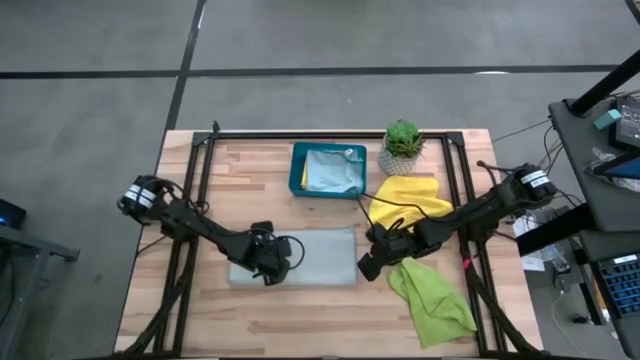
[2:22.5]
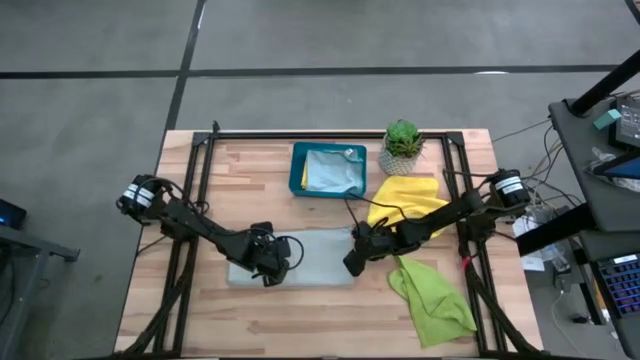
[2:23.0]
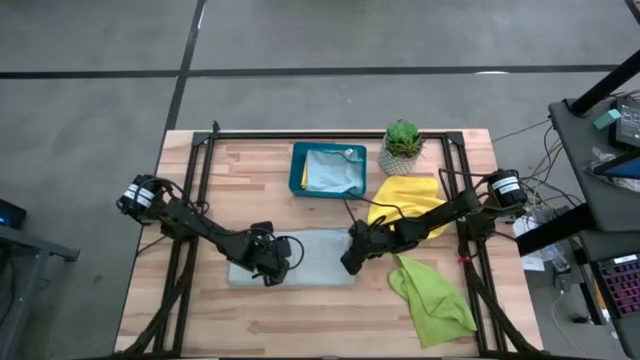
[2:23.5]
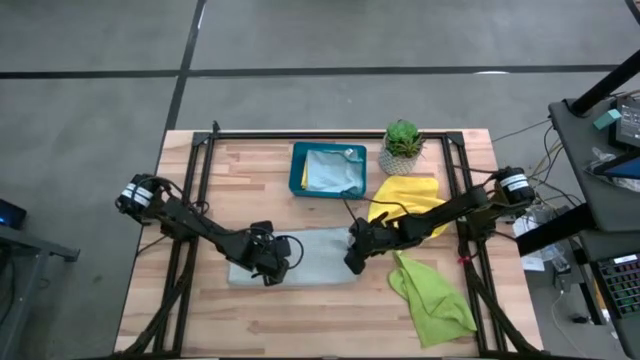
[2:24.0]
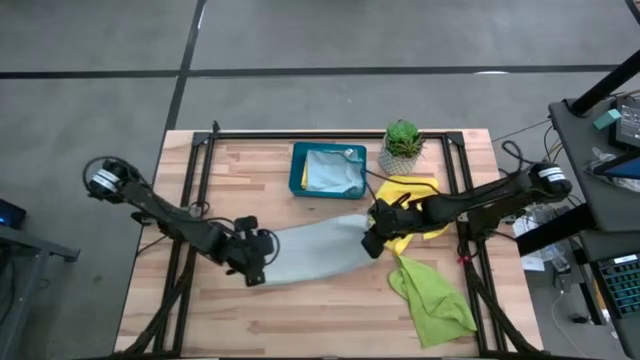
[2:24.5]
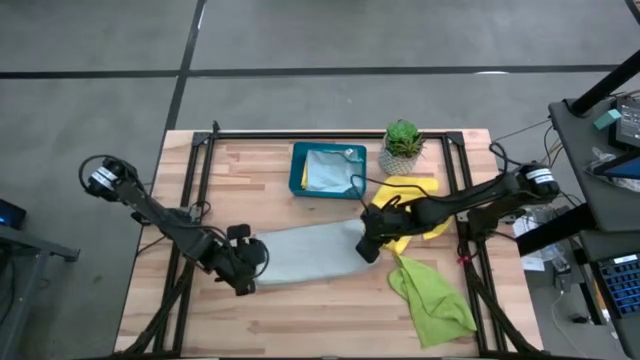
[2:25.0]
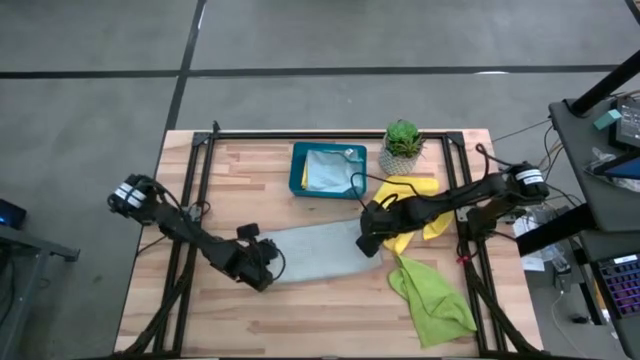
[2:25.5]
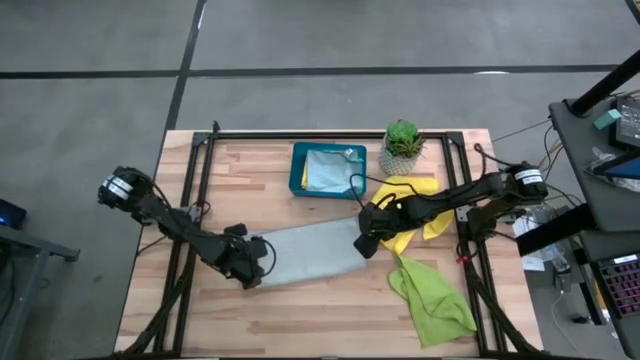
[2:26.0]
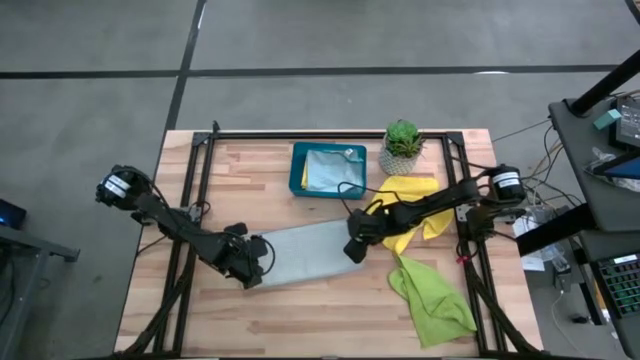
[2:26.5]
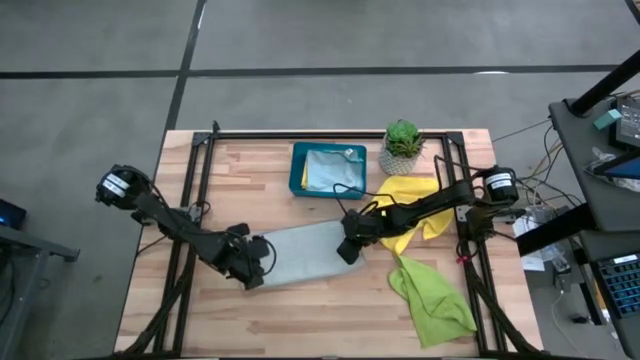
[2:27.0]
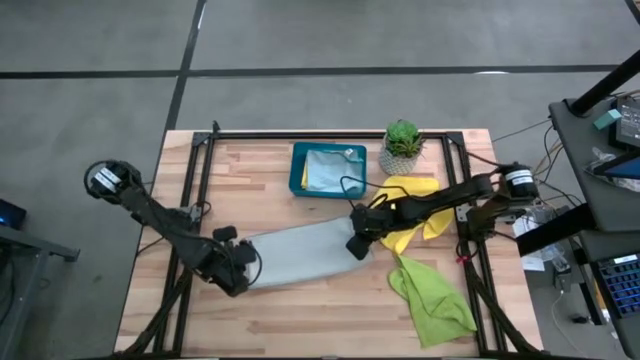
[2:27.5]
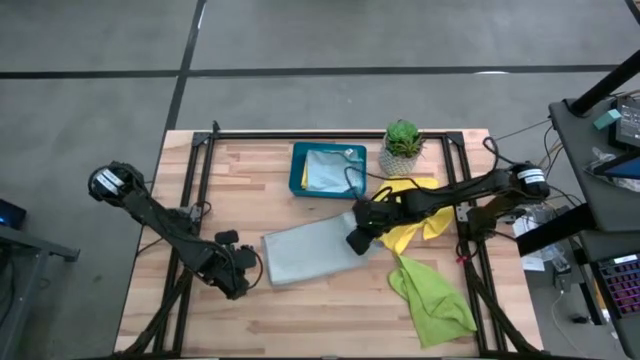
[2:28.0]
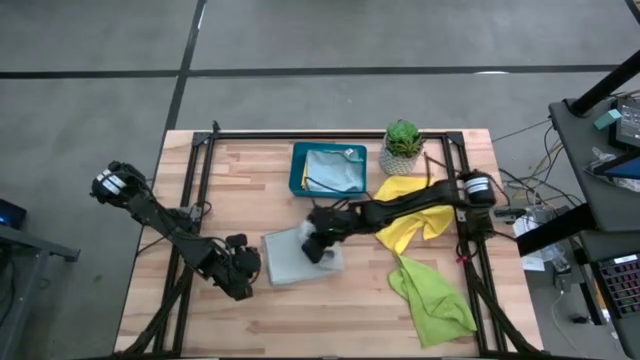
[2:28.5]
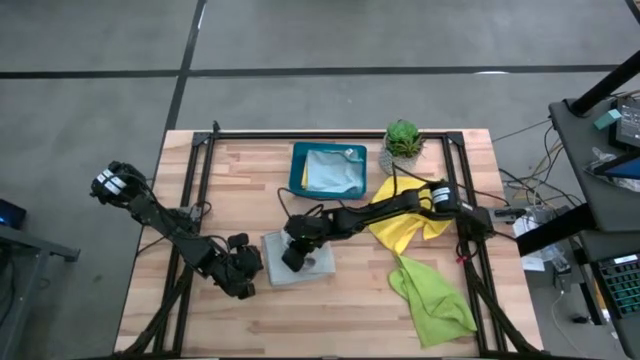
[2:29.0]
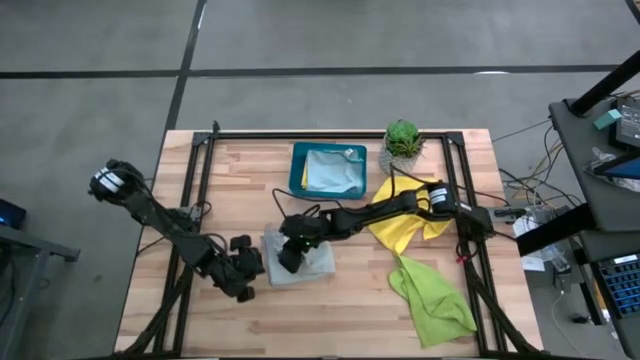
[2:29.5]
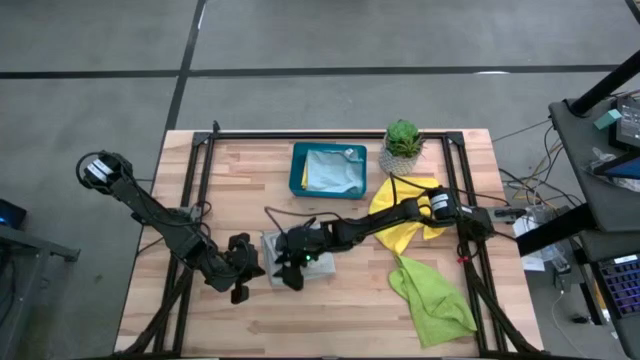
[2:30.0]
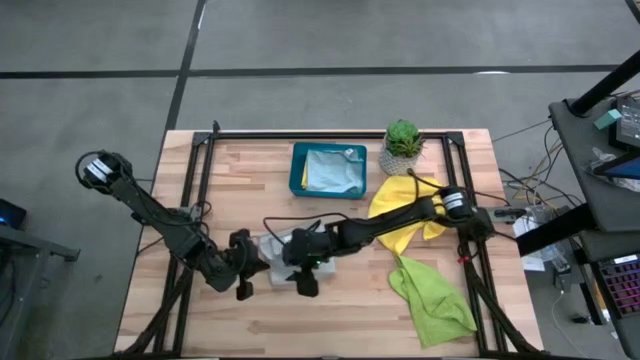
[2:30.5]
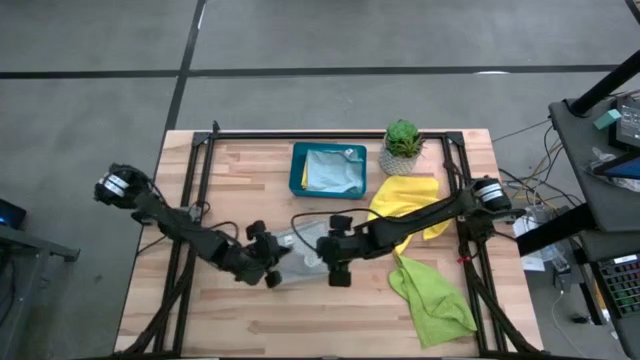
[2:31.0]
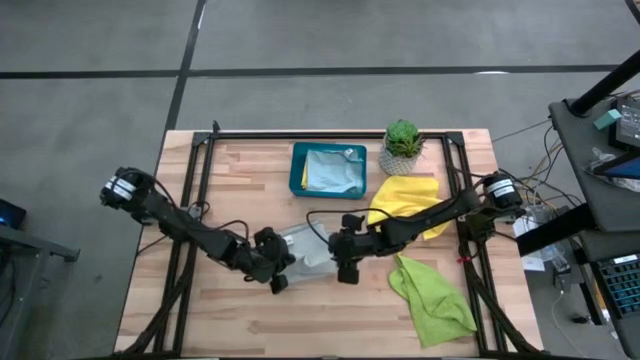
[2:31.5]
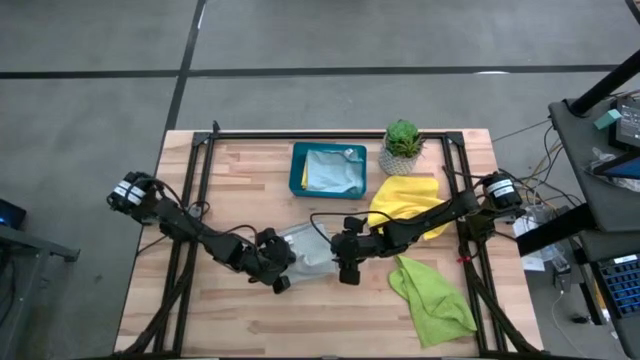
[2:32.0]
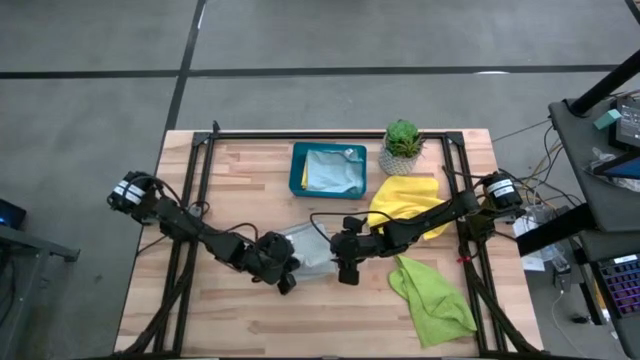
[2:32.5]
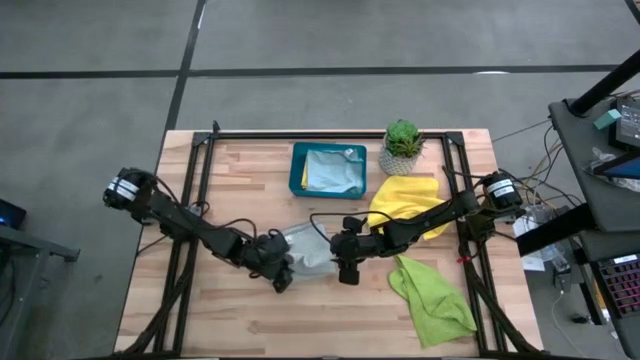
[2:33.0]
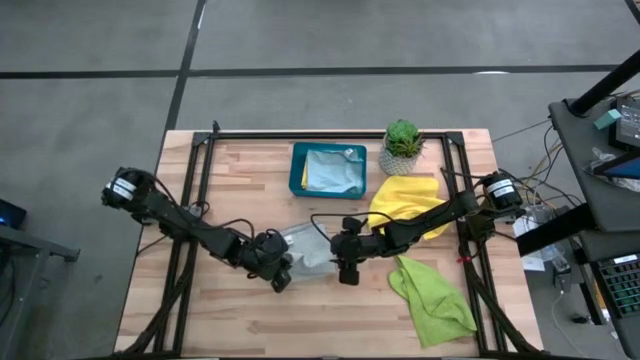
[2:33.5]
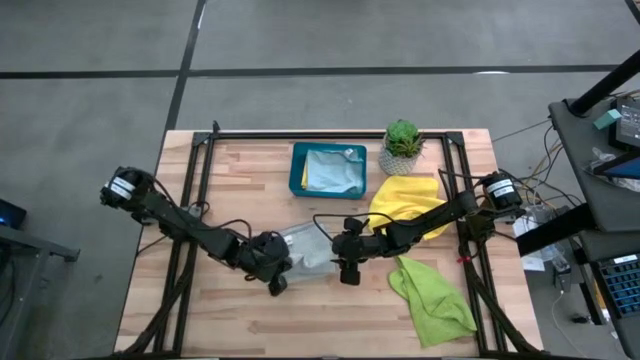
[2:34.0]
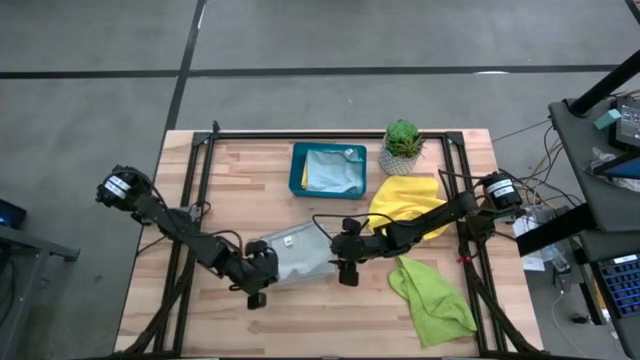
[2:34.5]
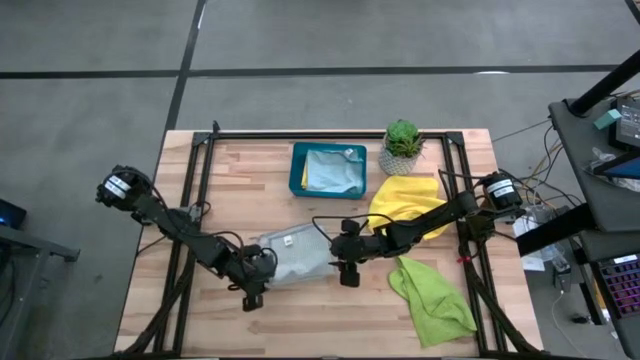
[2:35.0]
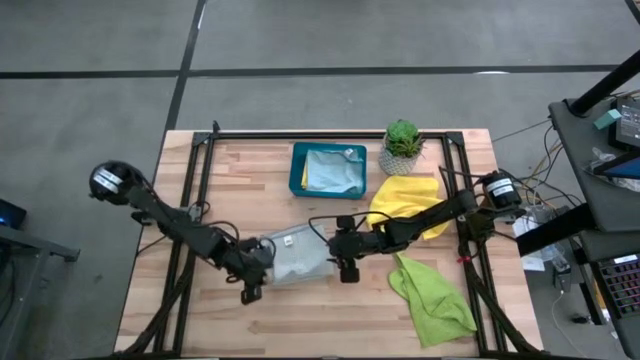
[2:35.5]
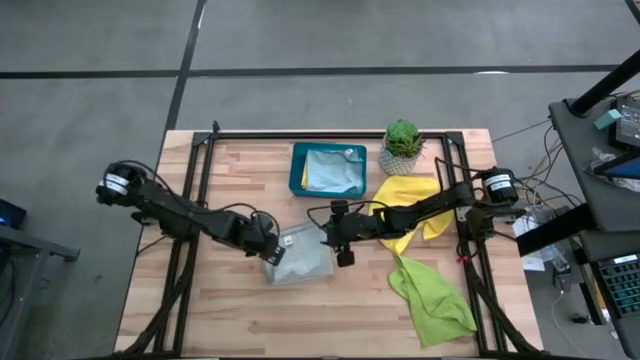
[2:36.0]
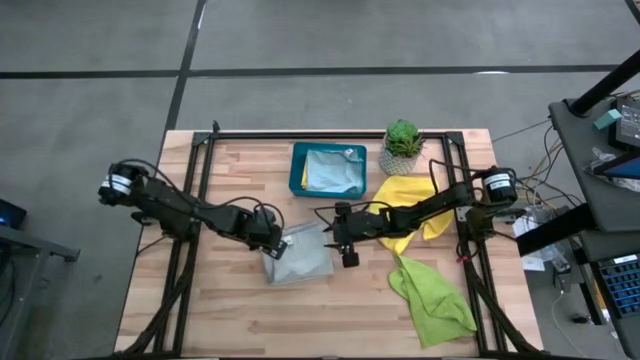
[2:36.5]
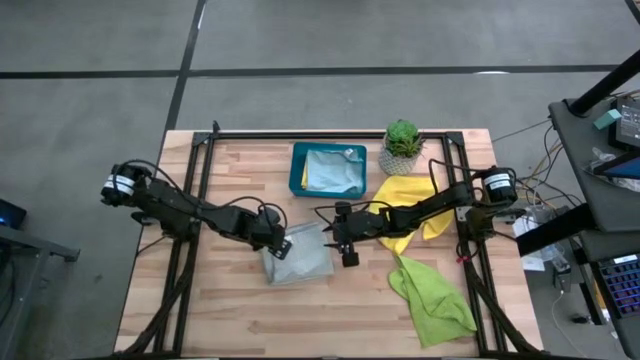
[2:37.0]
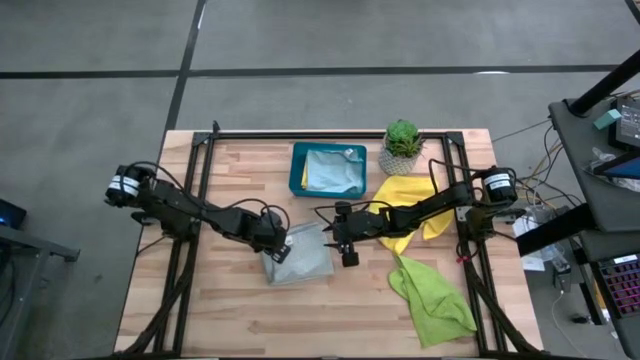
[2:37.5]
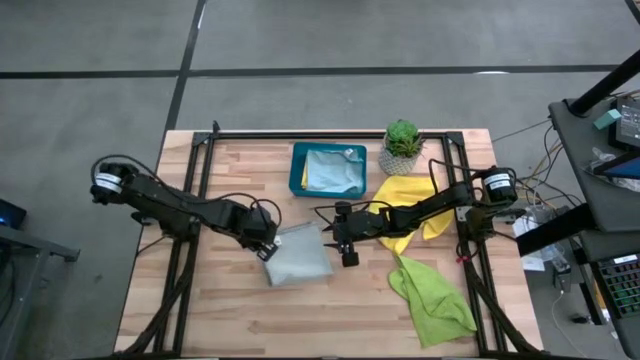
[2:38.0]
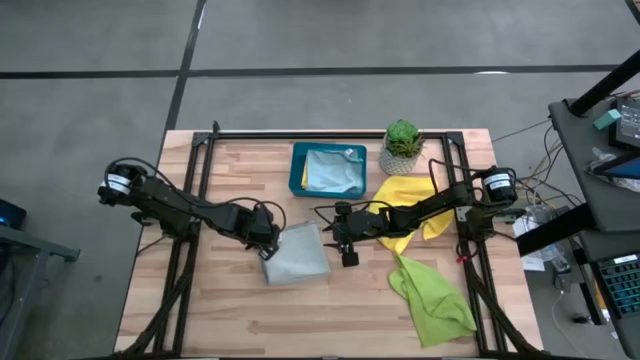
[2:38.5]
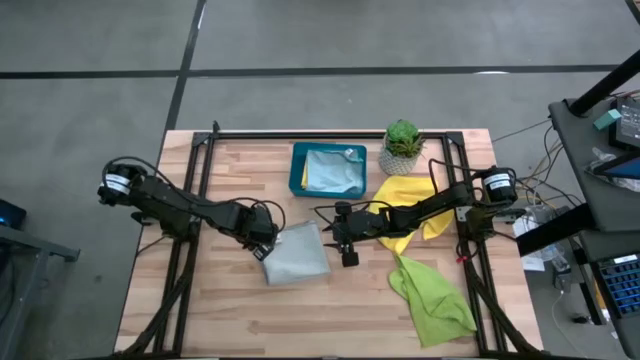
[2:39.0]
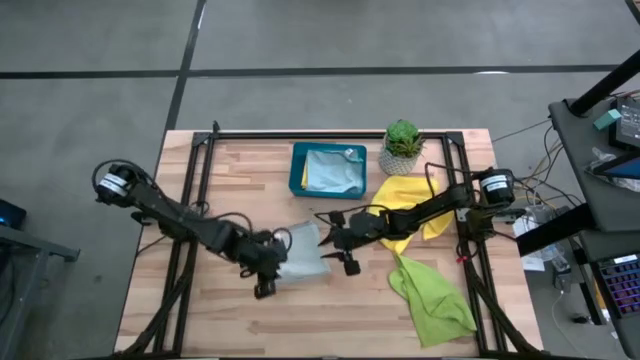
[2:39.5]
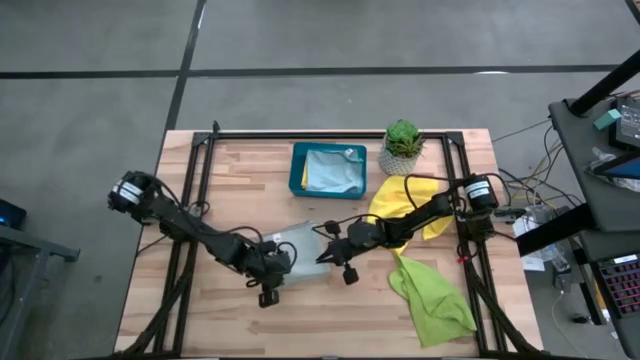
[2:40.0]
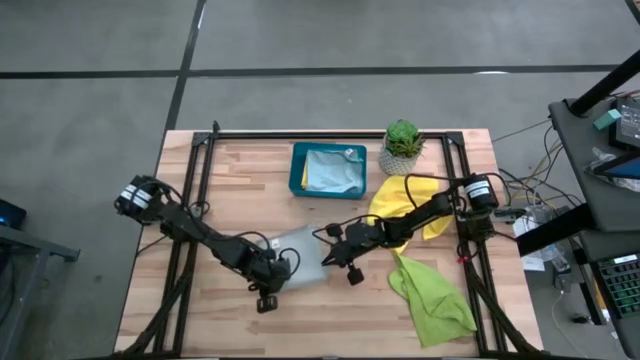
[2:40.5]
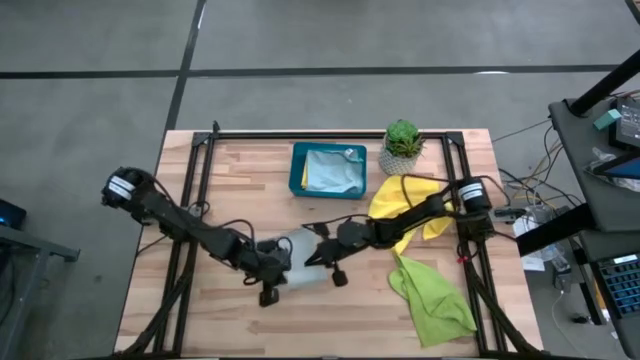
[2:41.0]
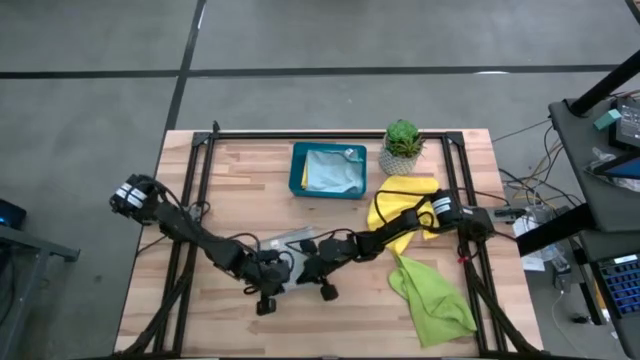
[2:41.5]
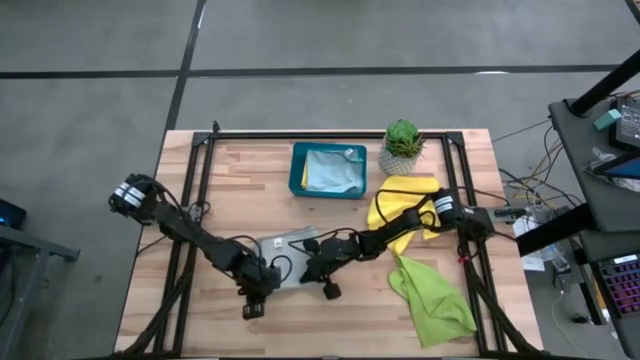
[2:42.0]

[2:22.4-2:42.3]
Task: Fold microfiber towels
Fold the grey microfiber cloth
